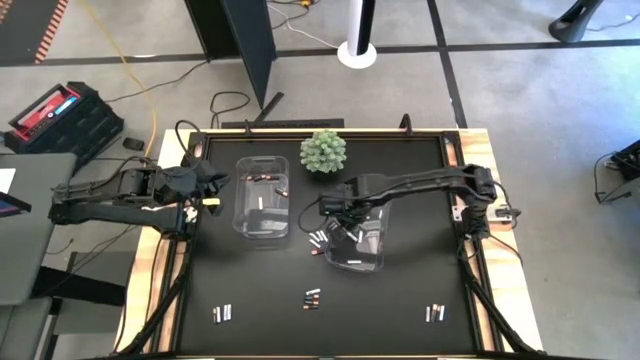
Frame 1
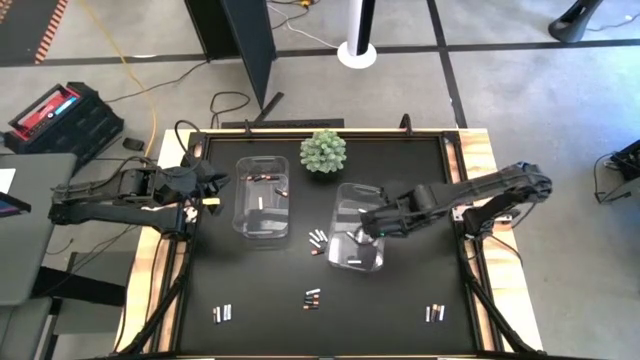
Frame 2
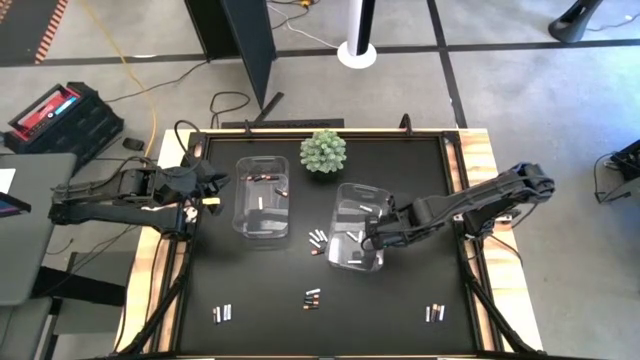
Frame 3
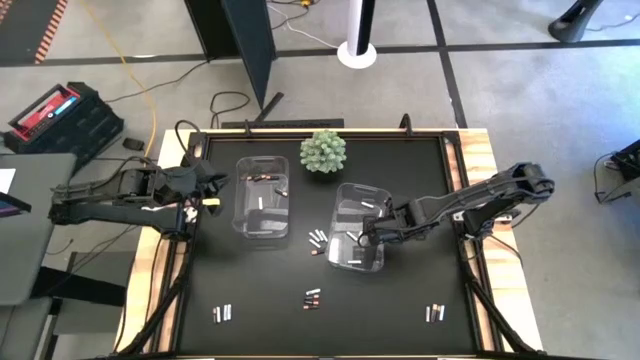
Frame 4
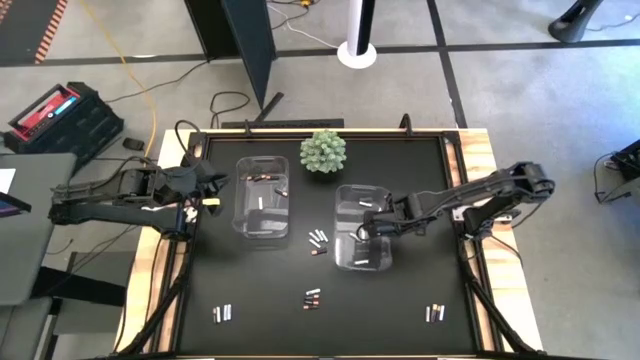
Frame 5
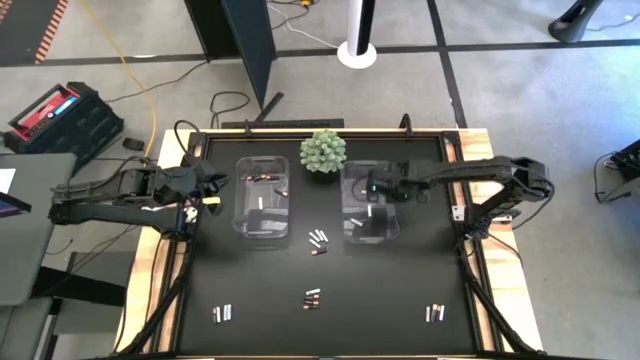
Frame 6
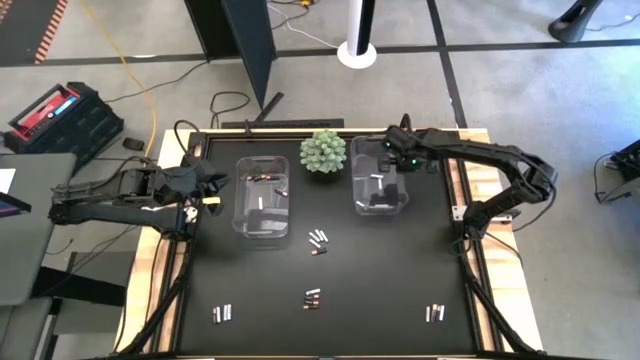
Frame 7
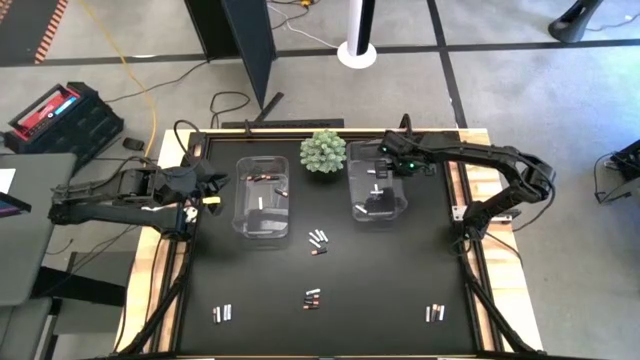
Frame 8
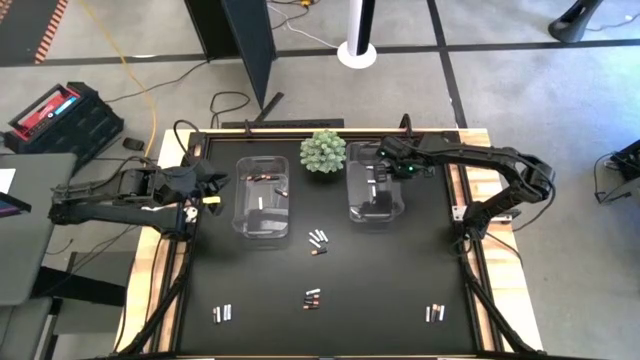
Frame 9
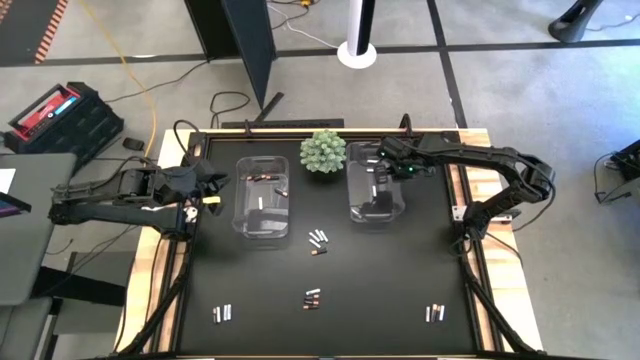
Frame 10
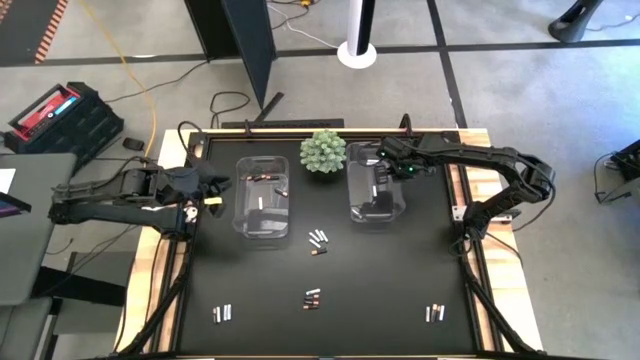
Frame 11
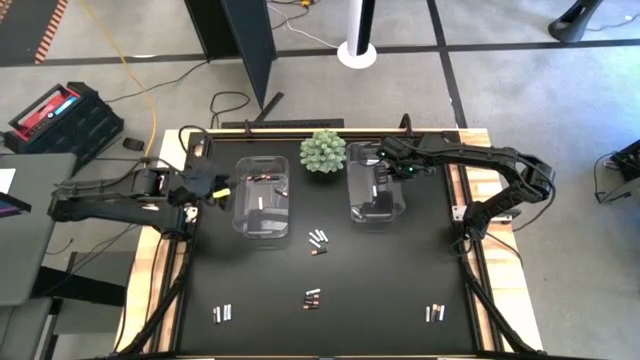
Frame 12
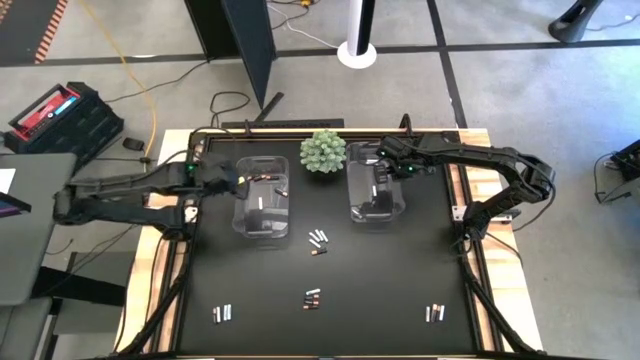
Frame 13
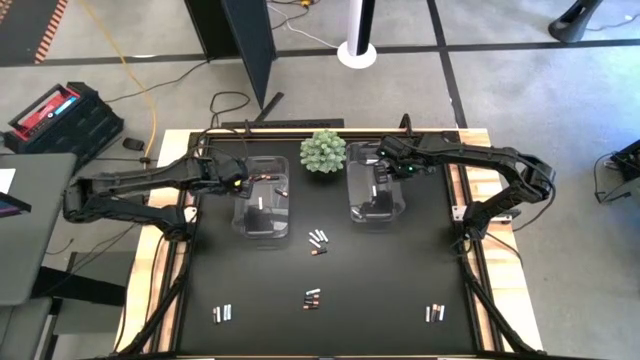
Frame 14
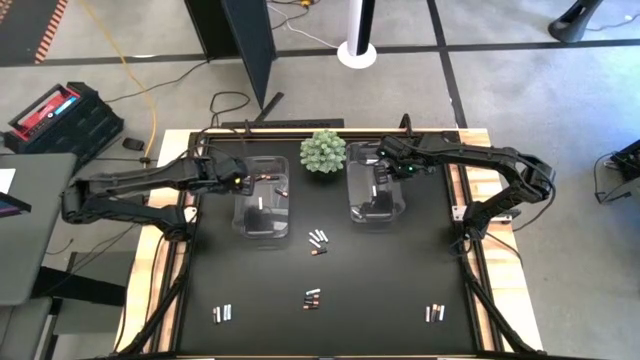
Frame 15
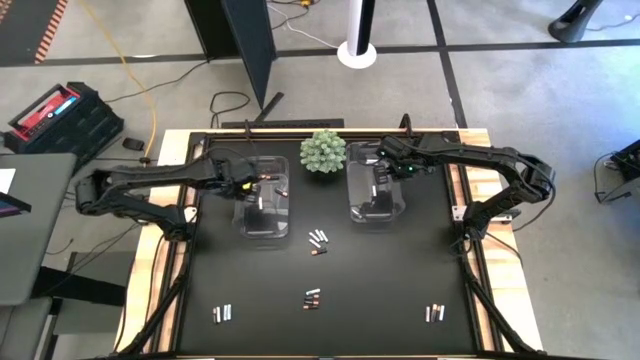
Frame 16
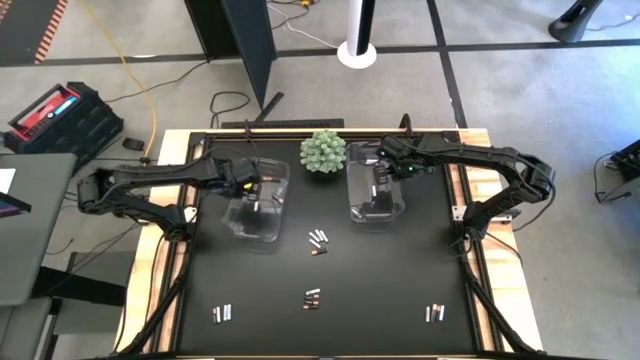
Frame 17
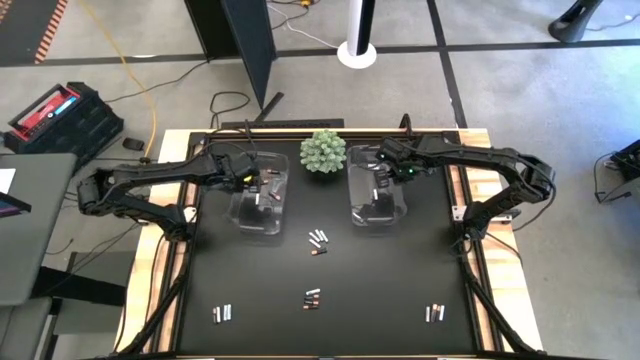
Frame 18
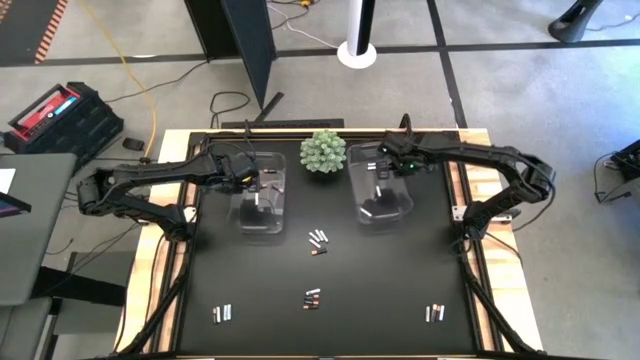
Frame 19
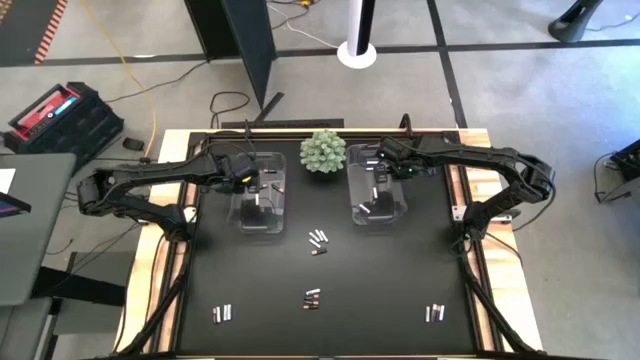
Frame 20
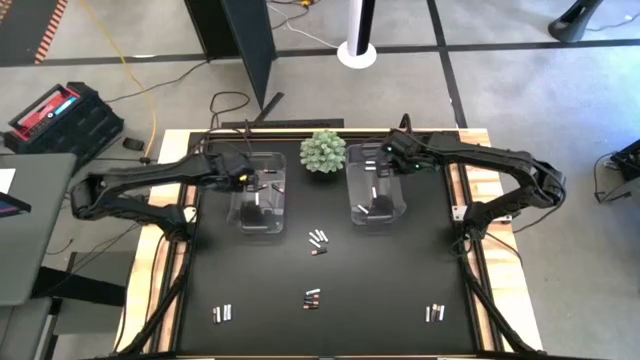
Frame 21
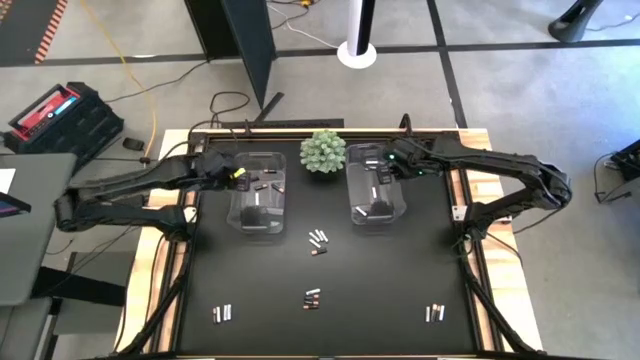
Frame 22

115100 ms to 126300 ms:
Task: Sort batteries
Adjust the transparent bins

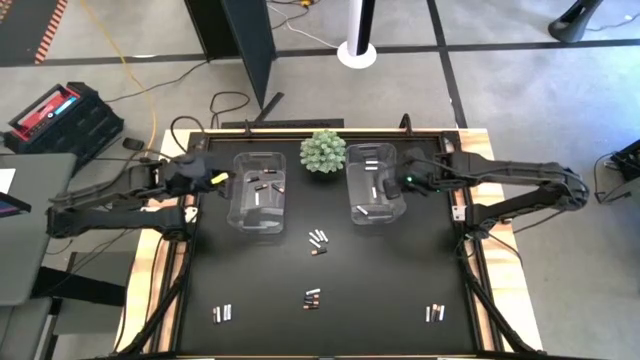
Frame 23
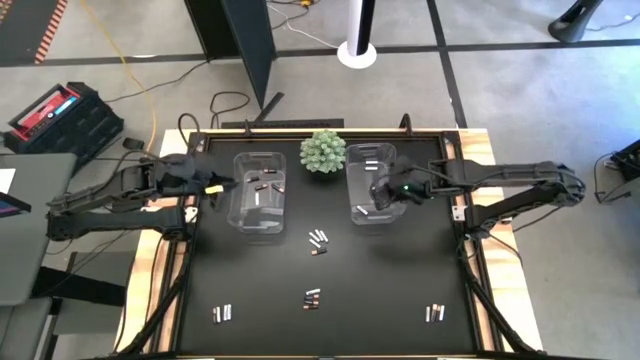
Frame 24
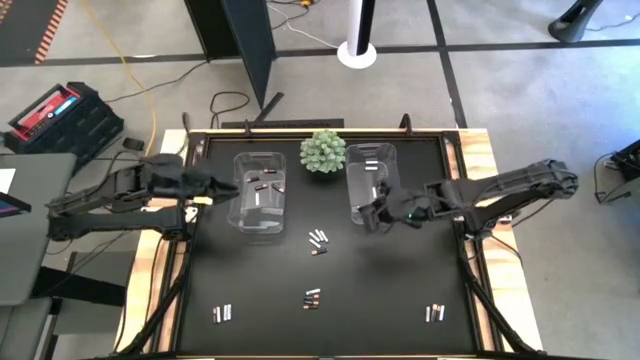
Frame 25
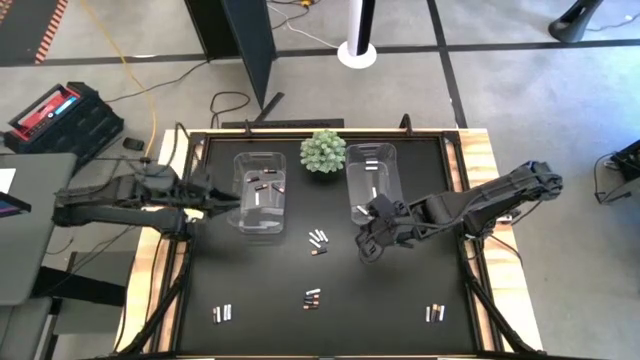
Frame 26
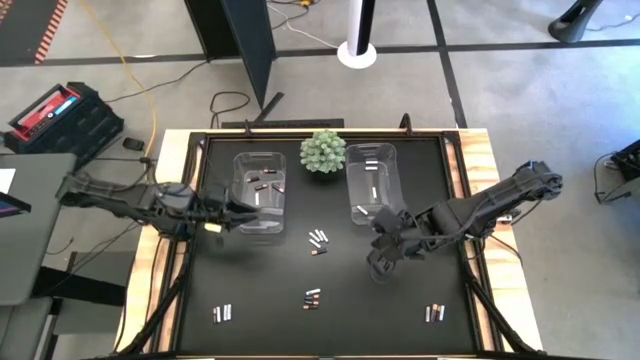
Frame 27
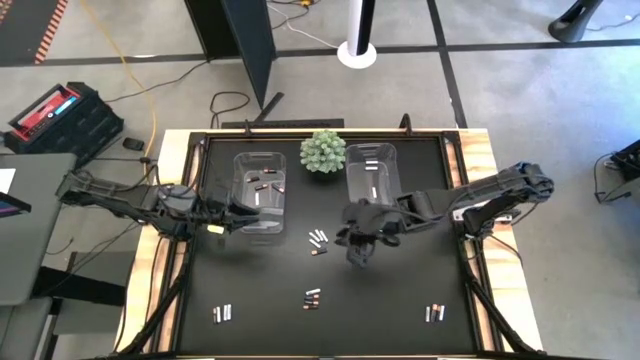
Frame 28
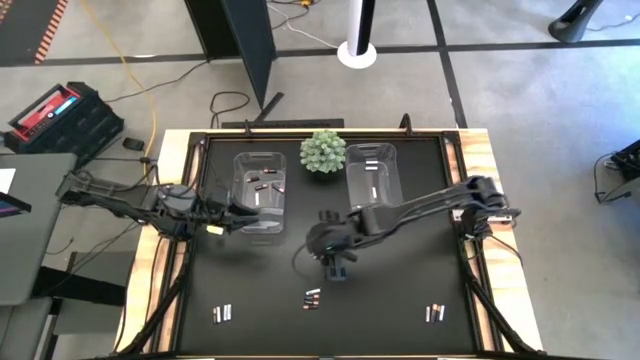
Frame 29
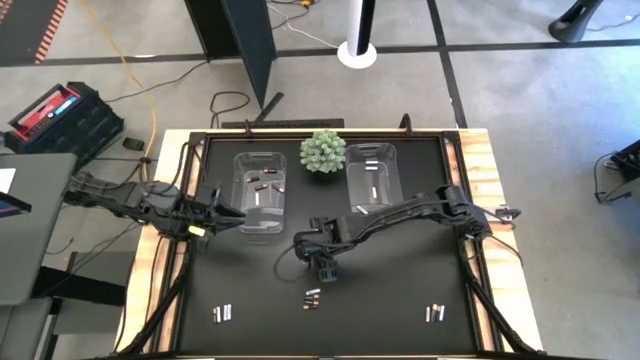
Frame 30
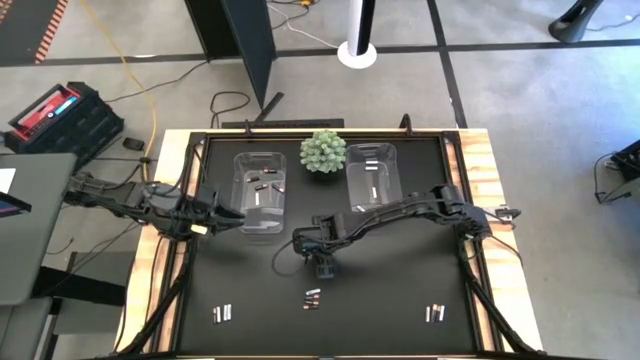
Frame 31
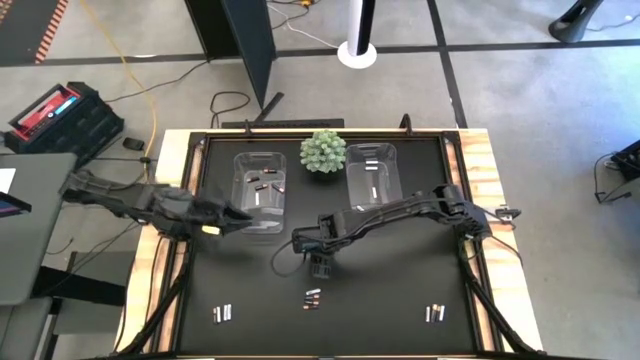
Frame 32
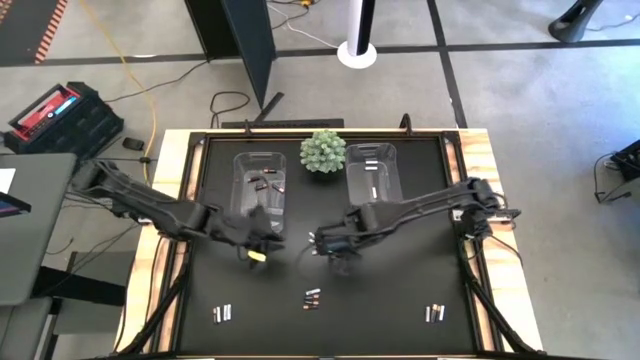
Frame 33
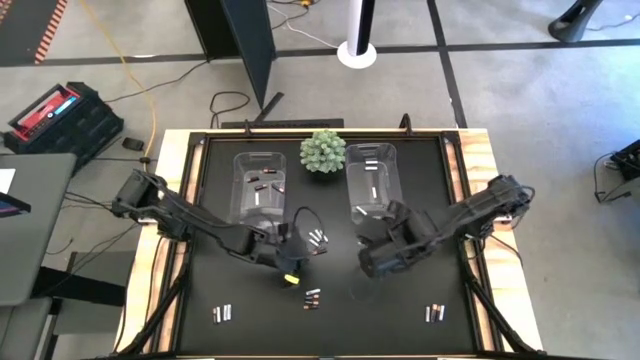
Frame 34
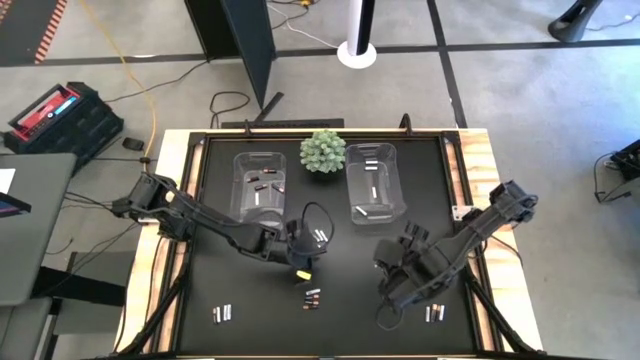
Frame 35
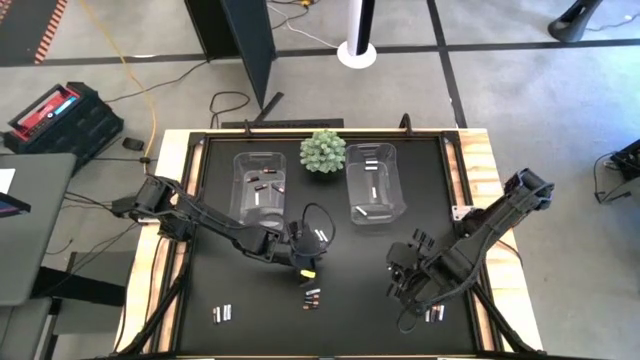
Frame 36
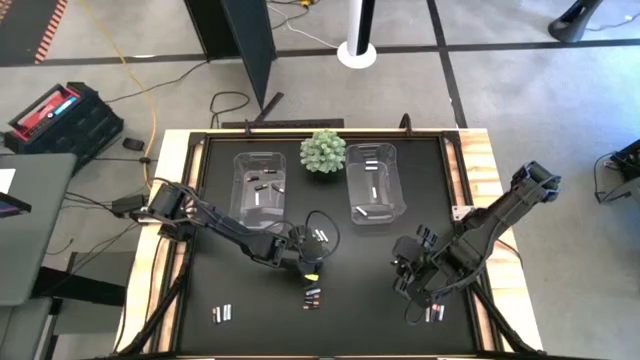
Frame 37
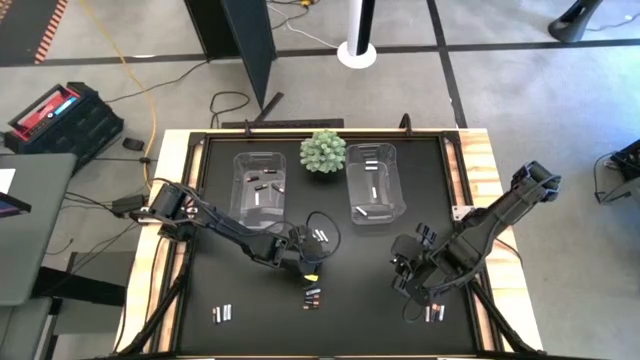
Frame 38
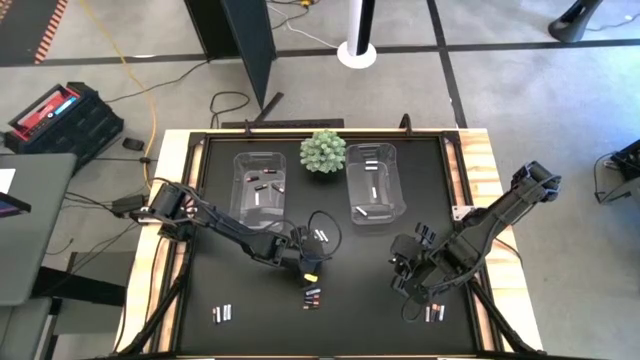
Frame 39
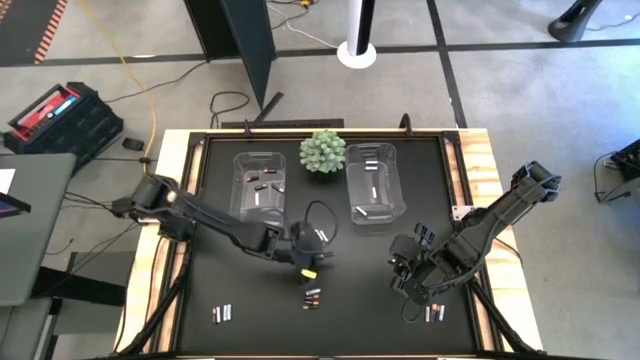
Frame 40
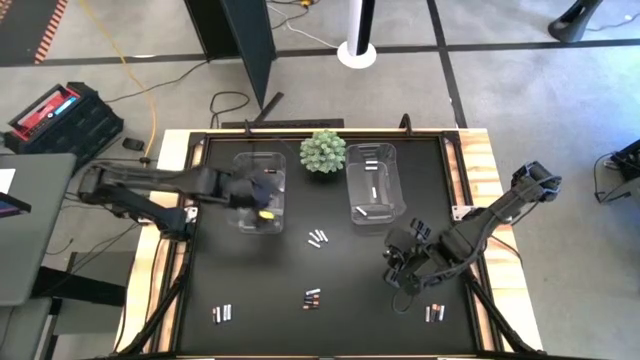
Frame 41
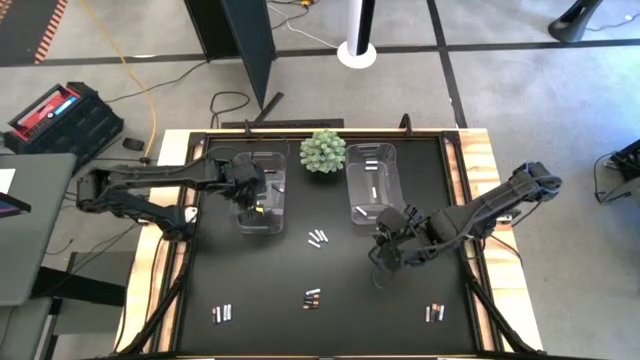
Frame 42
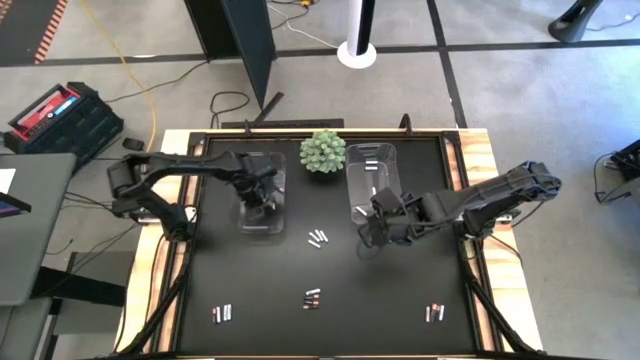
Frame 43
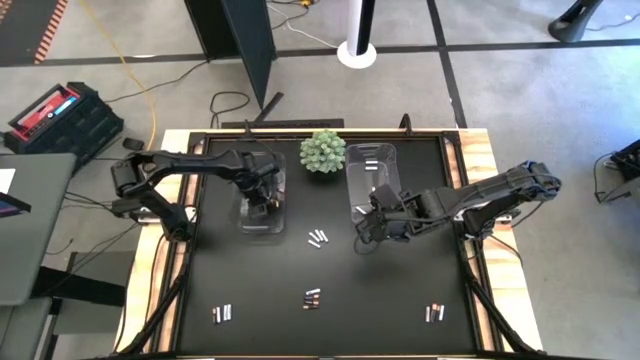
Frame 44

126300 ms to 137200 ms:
Put the black-brown battery into the left transparent bin
